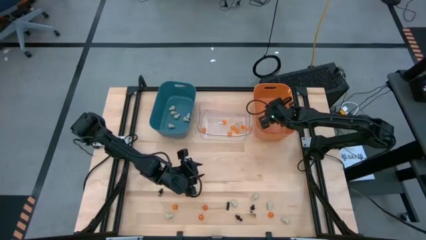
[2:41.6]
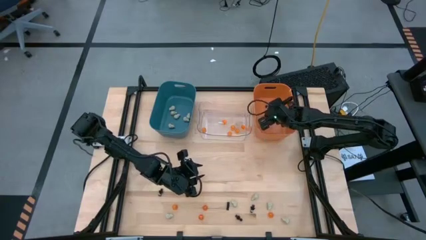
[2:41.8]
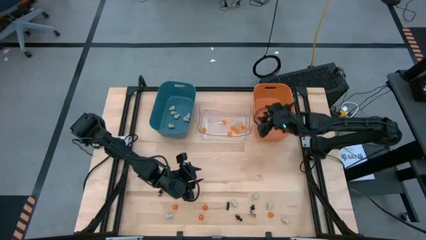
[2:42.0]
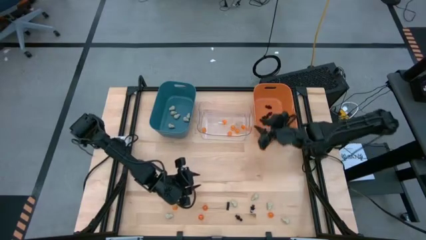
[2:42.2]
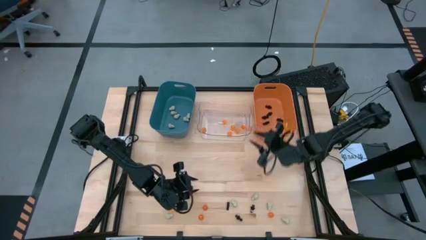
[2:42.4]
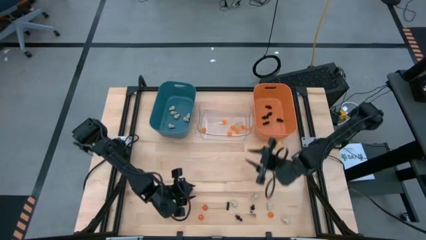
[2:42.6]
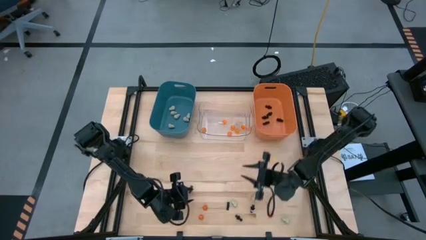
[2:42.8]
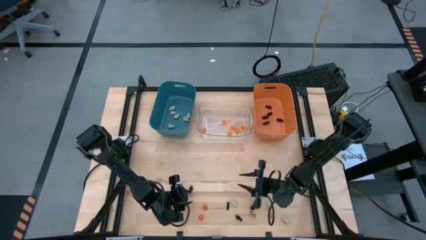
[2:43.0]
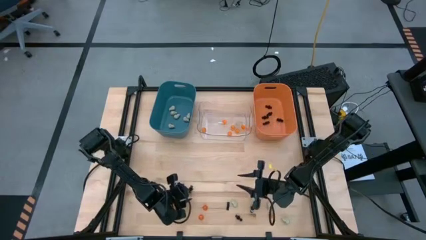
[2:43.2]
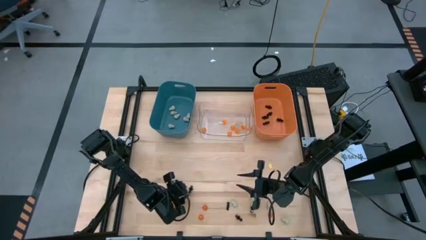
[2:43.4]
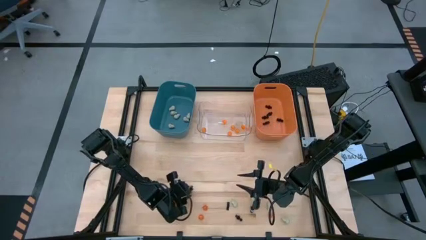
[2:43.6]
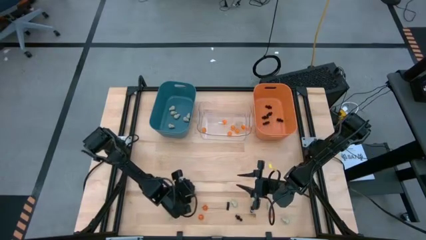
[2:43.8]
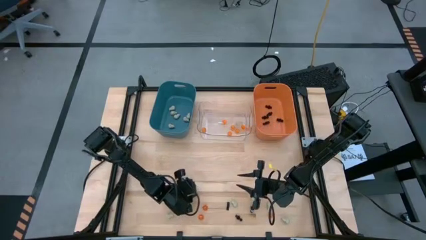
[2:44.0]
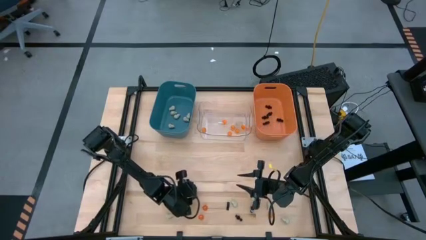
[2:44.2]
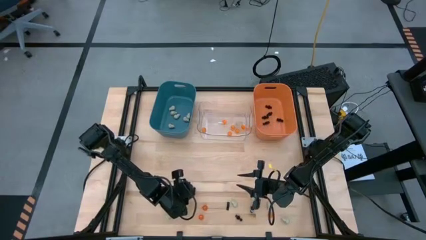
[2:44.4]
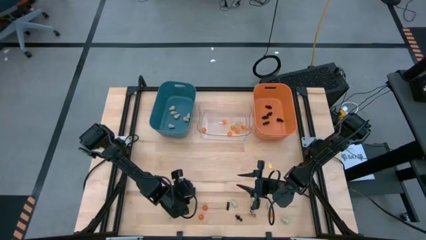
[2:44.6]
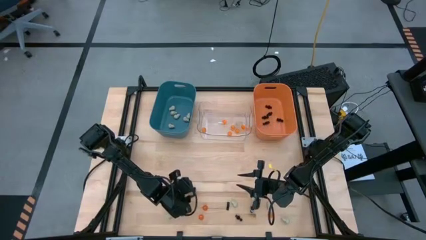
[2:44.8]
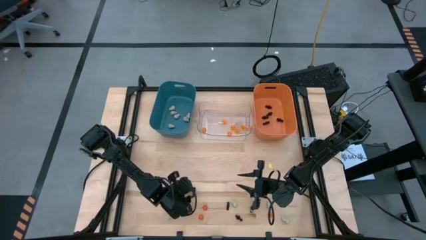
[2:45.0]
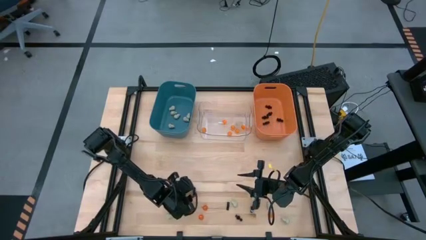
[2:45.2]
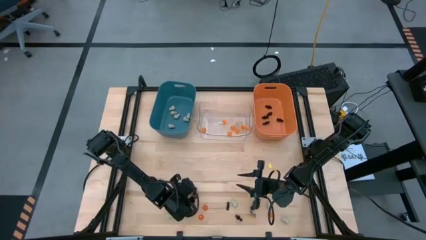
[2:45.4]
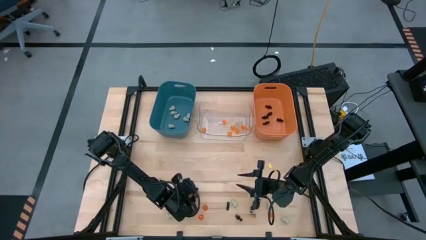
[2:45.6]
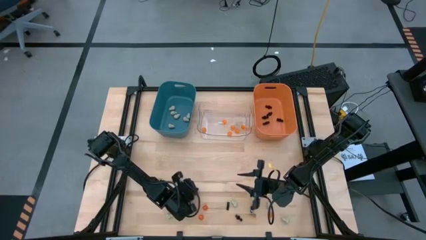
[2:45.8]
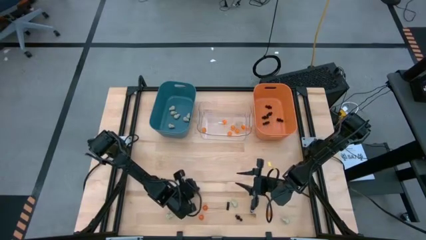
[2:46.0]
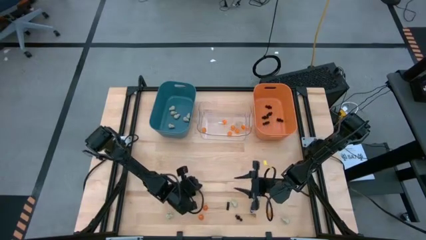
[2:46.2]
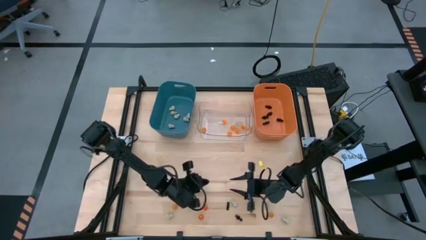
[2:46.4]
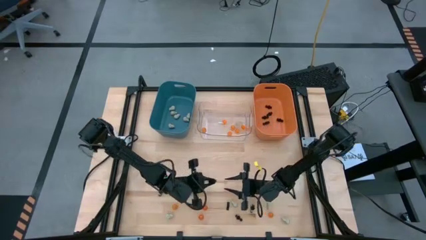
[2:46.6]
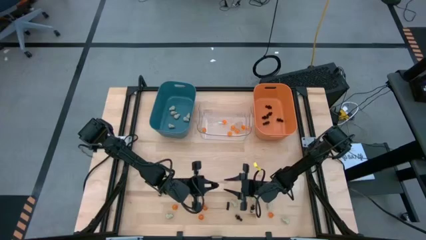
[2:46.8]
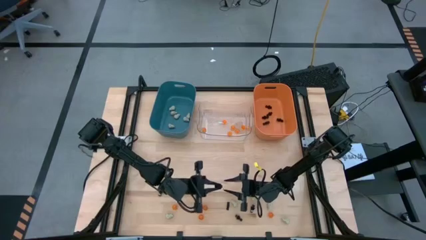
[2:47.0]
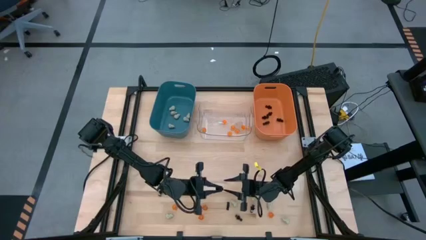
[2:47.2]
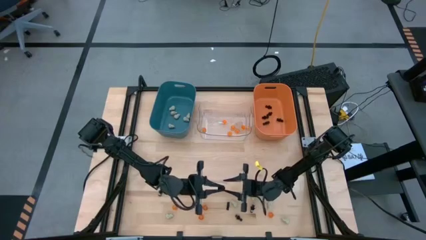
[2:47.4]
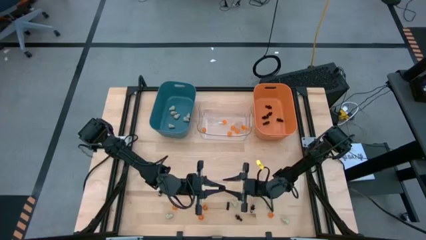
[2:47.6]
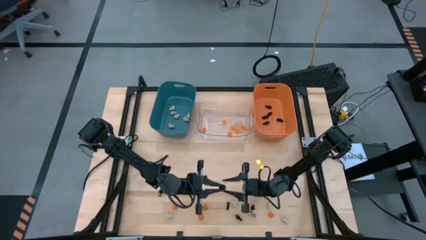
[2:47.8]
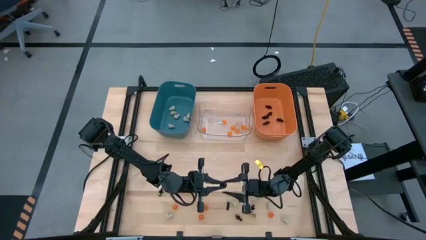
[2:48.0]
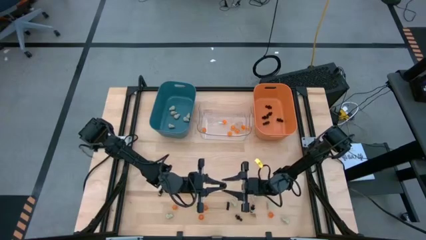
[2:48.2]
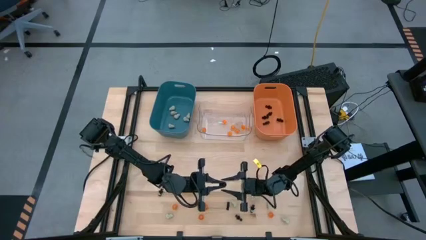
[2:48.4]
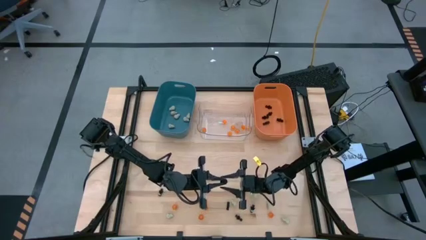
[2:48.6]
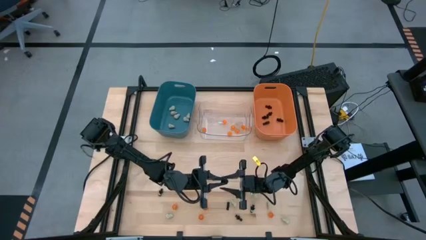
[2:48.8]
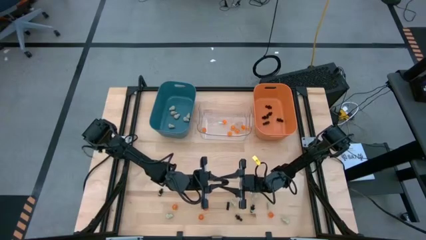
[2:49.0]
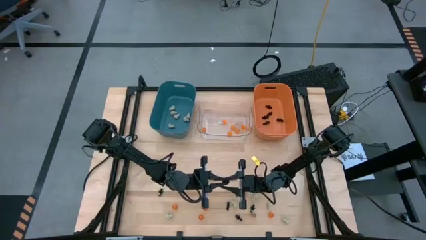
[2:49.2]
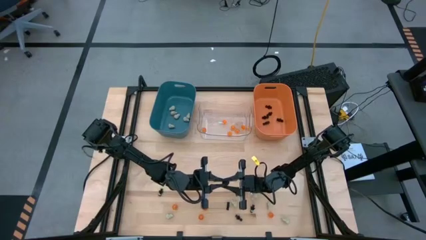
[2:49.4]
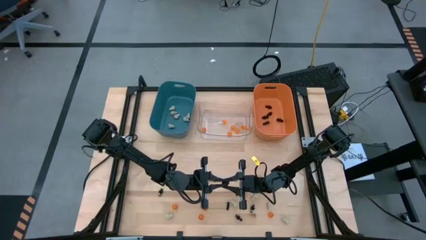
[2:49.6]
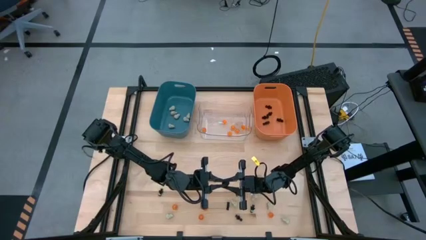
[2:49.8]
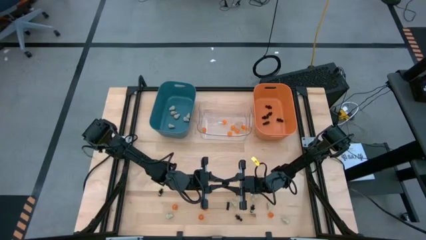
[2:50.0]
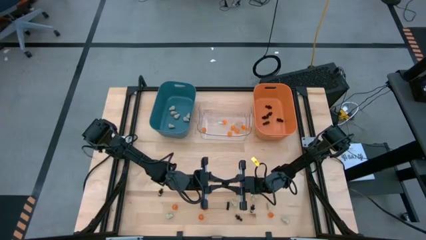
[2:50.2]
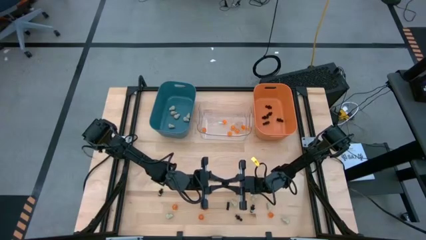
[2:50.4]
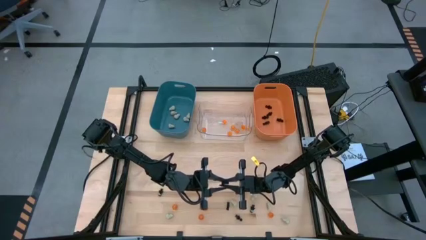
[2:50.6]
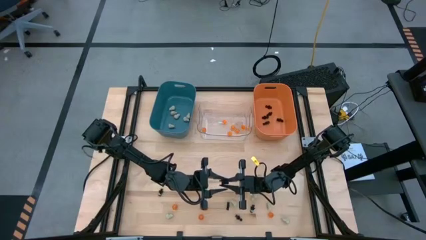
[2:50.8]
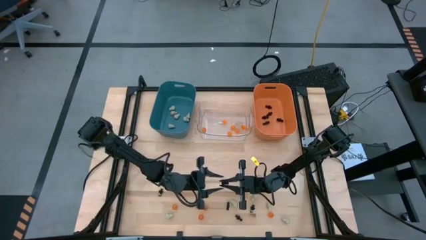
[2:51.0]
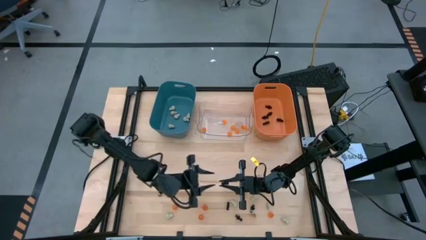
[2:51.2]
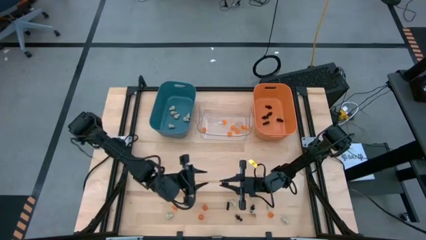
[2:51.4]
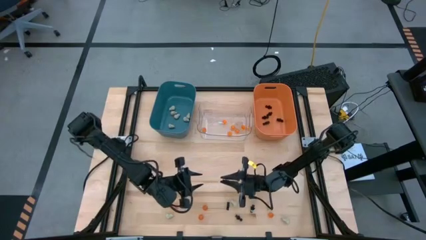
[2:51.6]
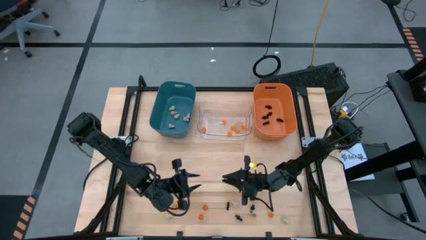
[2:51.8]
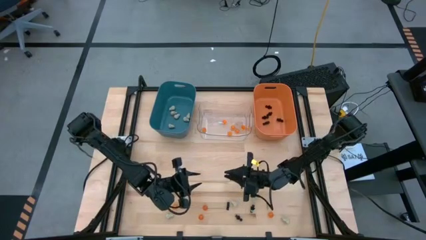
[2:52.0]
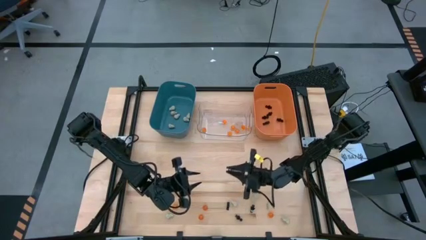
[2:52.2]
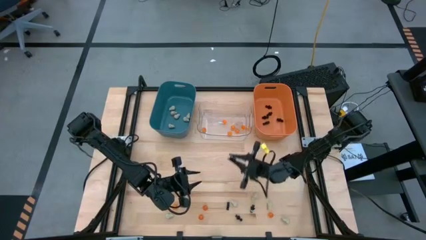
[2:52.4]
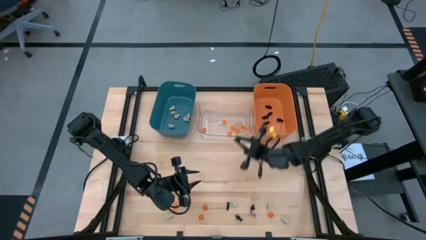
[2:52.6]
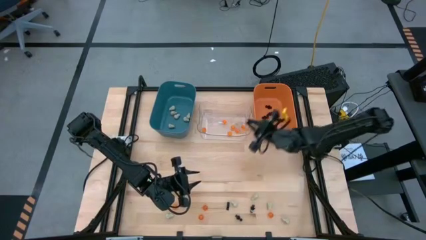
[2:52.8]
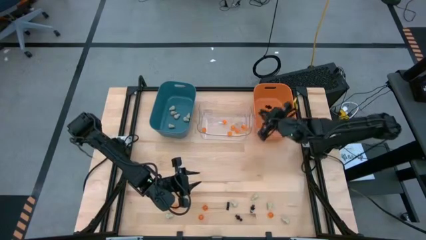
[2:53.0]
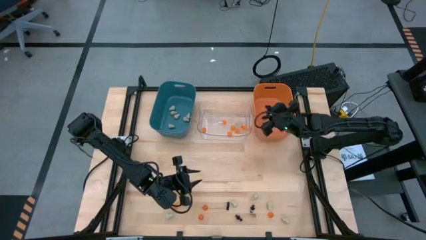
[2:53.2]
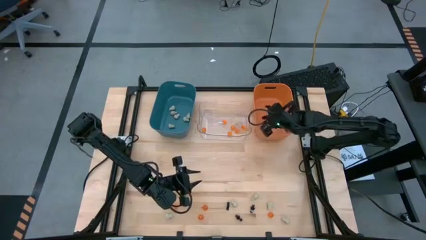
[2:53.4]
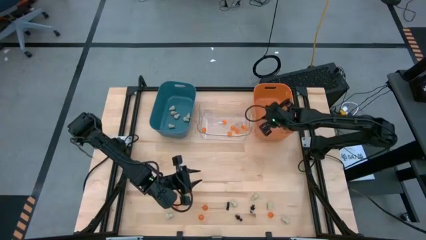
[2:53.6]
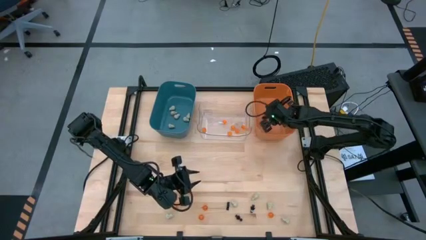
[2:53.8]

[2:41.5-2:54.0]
Task: Sort Halloween decoration
Put the black skeleton toy into the orange bin

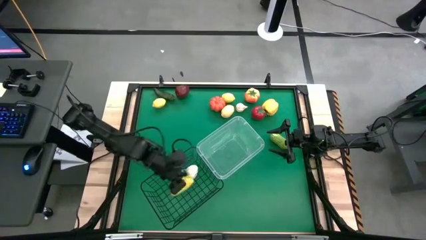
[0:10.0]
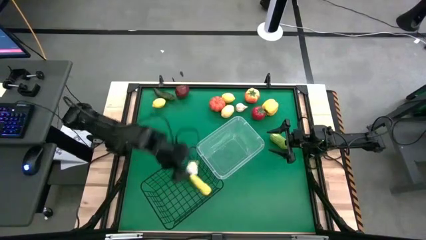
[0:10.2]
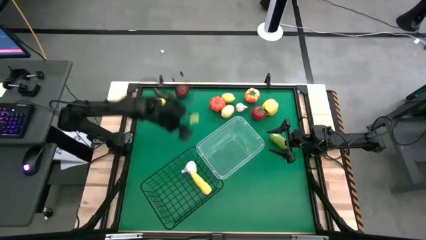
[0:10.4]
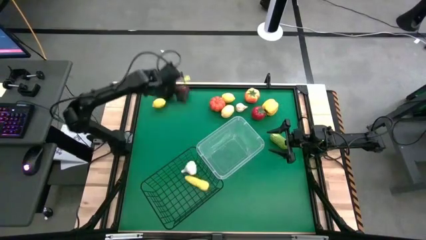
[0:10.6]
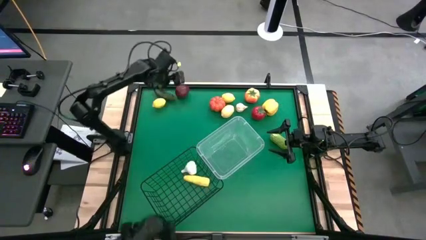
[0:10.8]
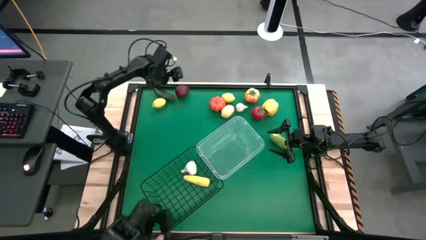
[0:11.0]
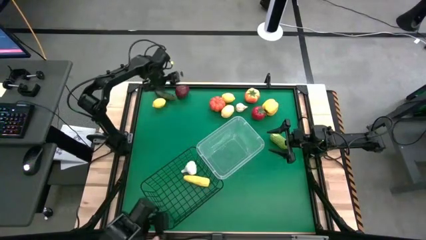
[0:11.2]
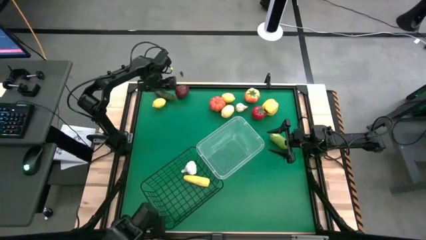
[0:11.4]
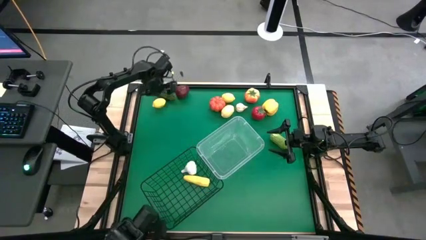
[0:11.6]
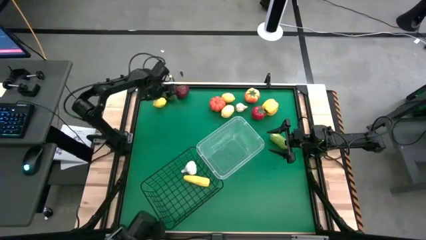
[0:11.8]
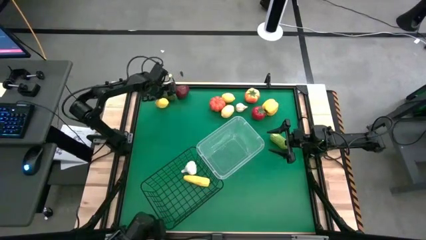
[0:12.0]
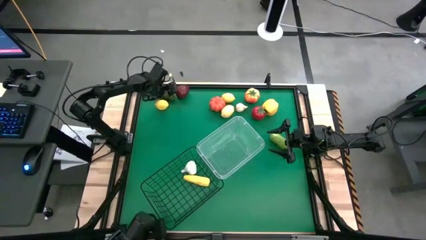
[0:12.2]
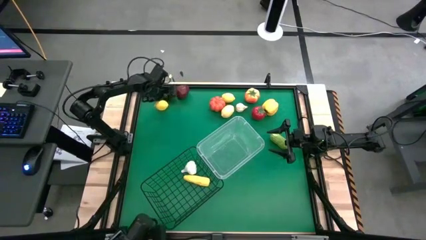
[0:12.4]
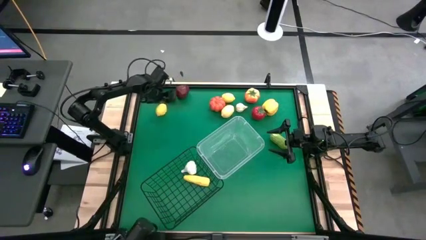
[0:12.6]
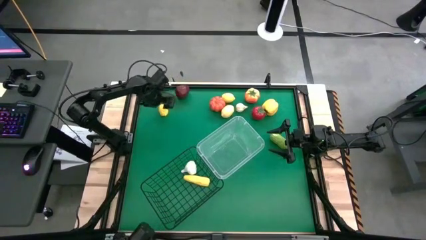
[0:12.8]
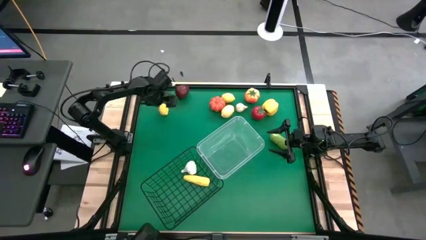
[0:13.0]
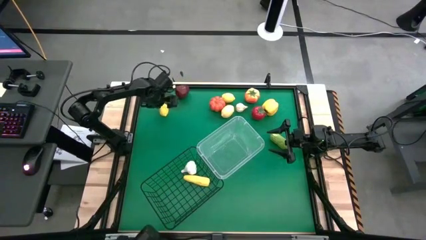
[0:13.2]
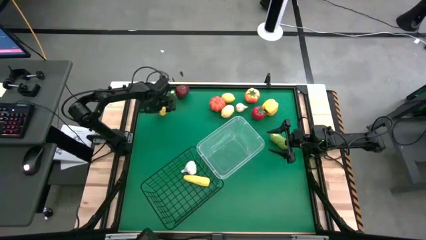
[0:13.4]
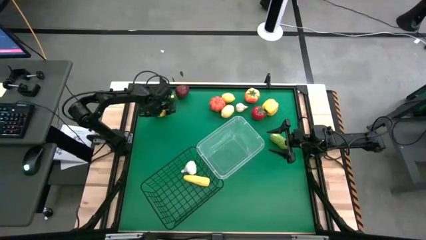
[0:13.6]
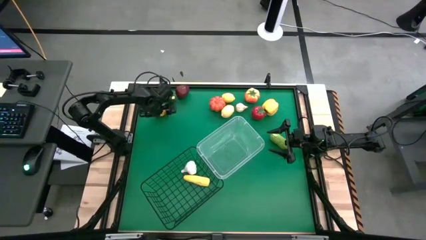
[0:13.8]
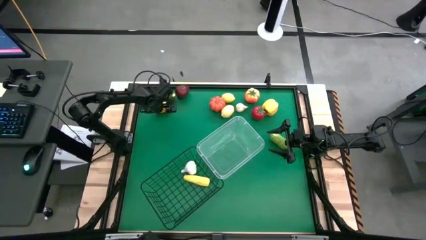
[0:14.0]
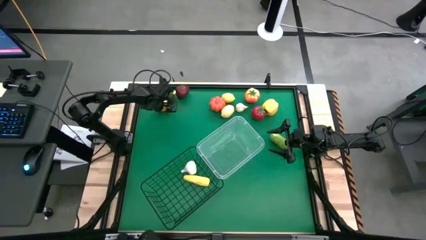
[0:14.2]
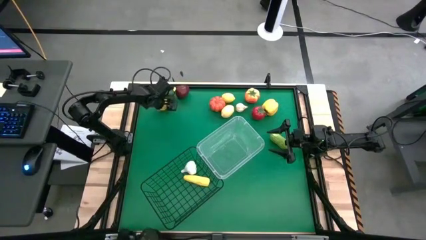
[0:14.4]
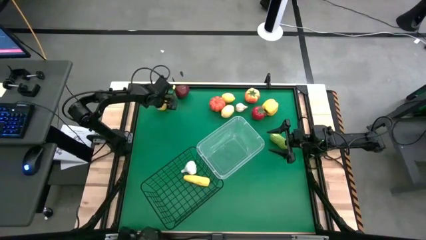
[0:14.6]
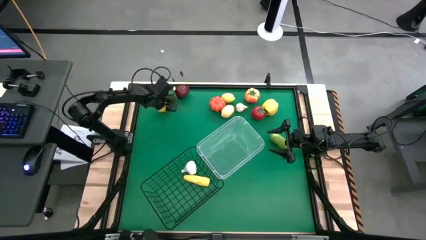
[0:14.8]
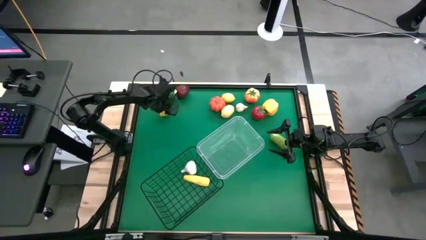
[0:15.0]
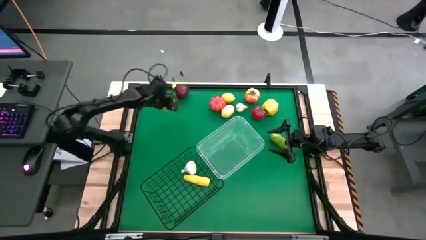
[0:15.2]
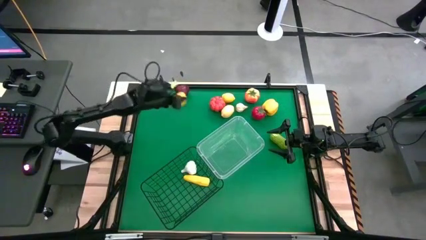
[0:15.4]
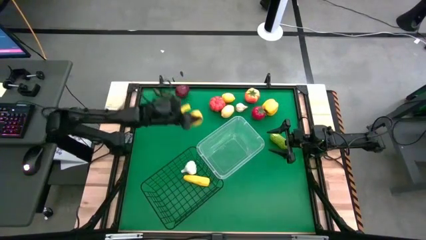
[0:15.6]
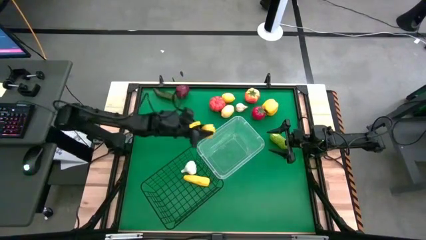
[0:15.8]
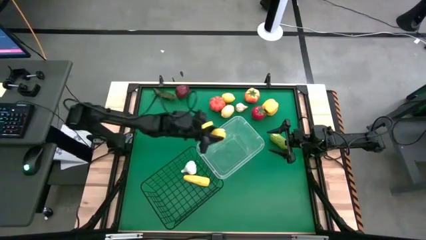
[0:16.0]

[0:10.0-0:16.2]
Task: Sort produce into baskets
Put the top left lemon into the transparent bin
